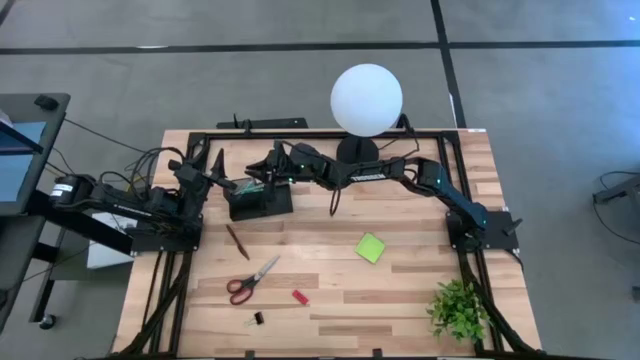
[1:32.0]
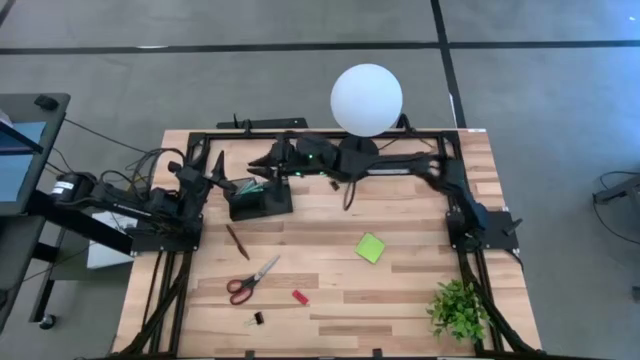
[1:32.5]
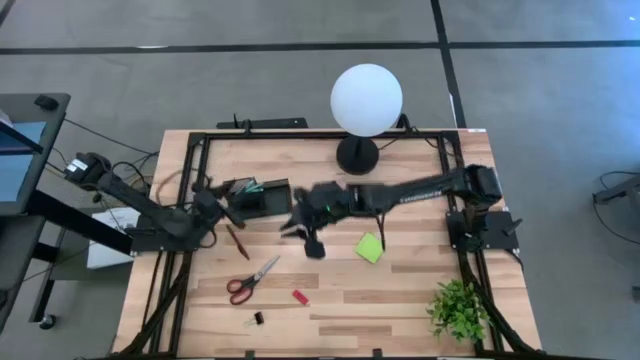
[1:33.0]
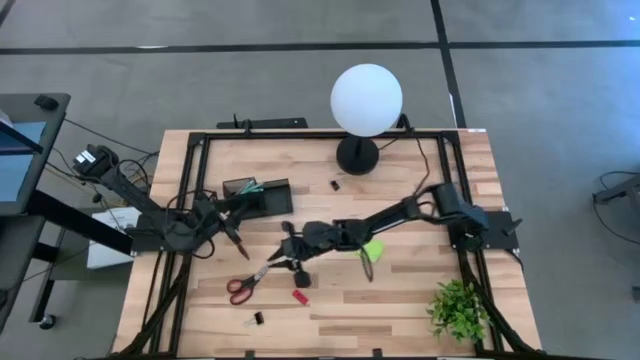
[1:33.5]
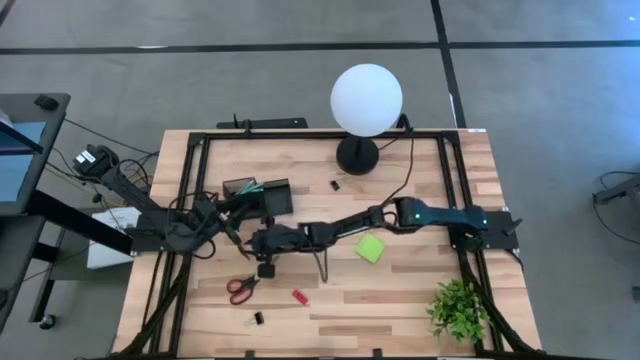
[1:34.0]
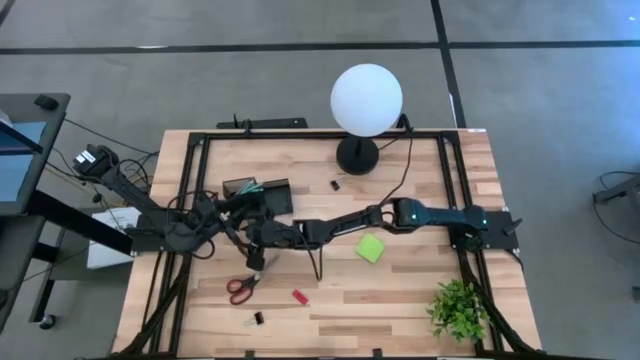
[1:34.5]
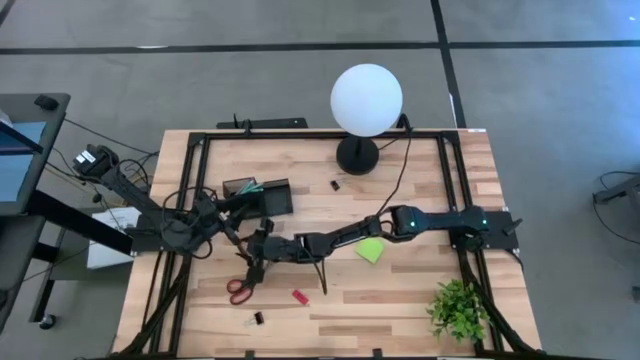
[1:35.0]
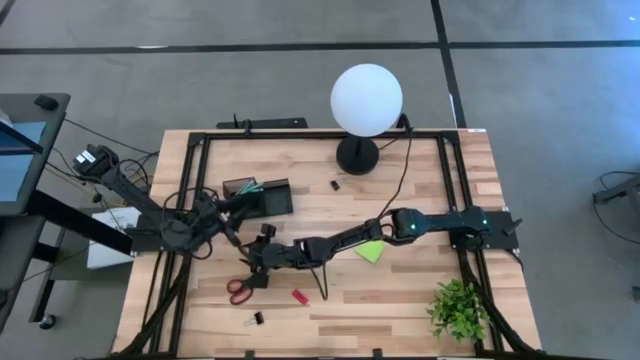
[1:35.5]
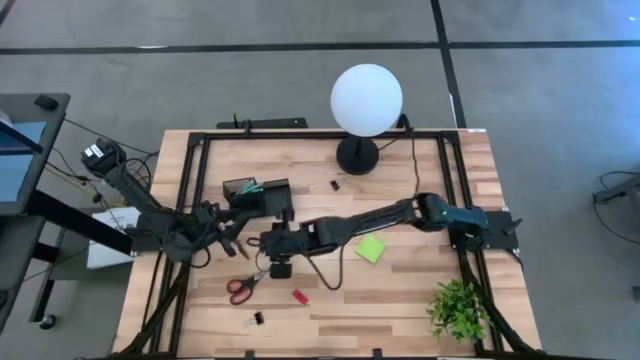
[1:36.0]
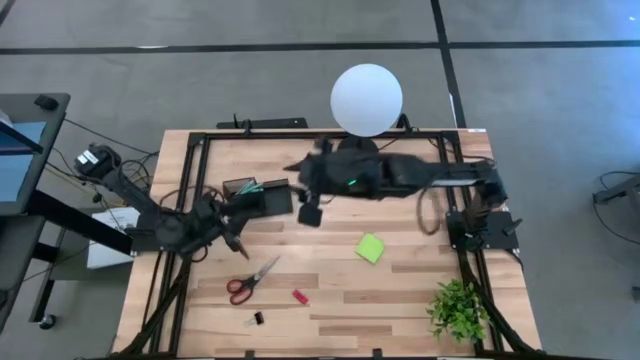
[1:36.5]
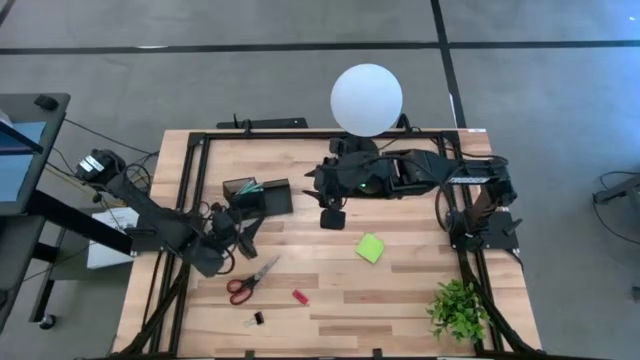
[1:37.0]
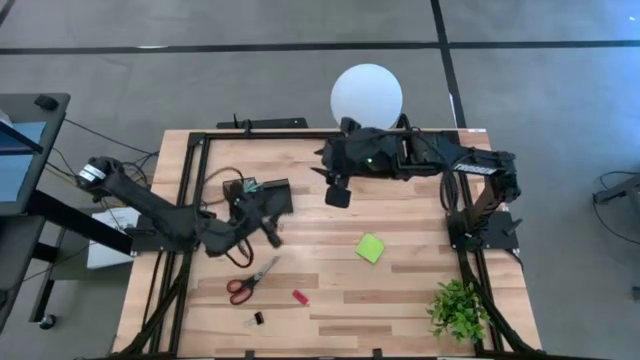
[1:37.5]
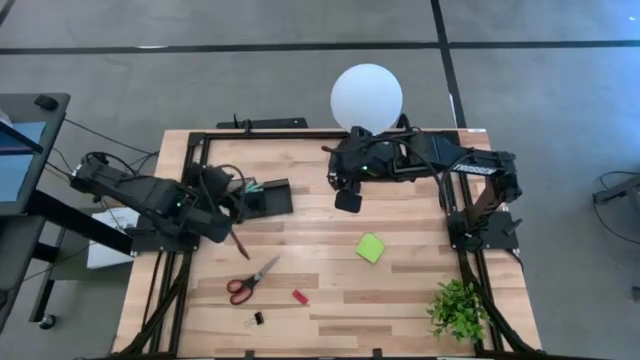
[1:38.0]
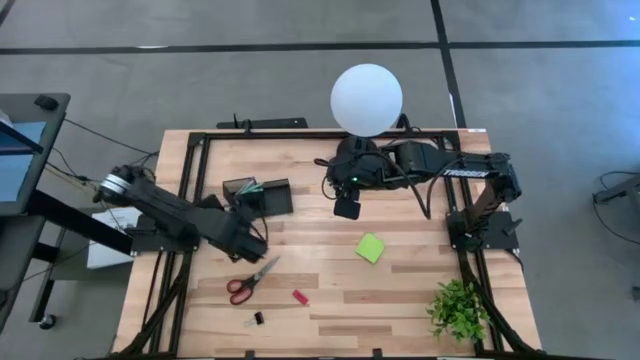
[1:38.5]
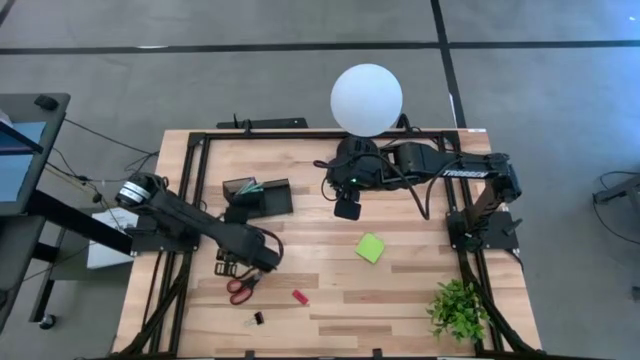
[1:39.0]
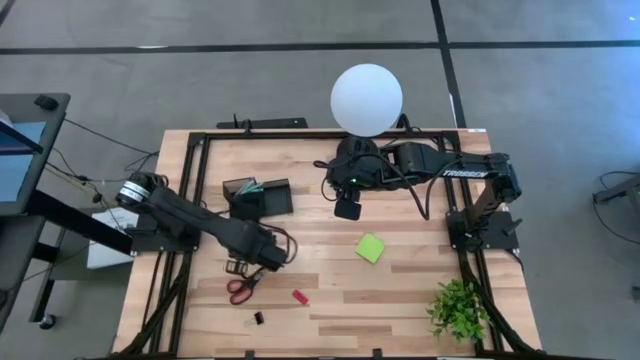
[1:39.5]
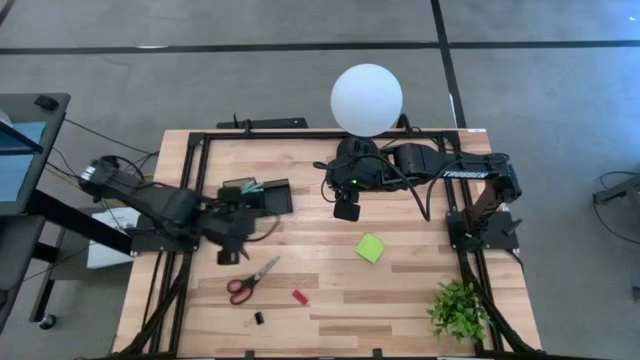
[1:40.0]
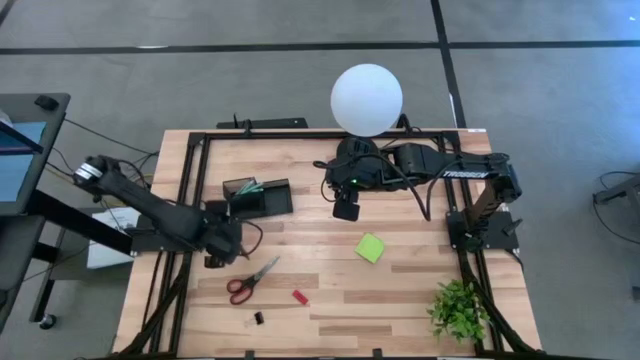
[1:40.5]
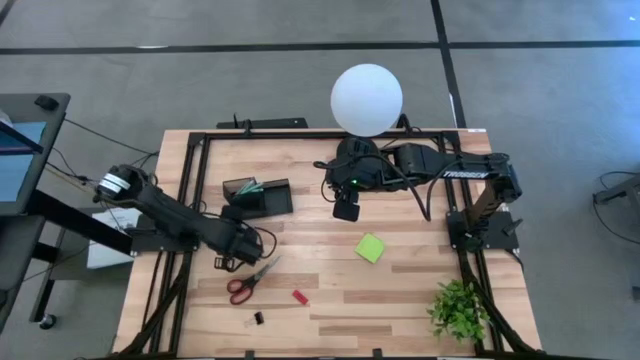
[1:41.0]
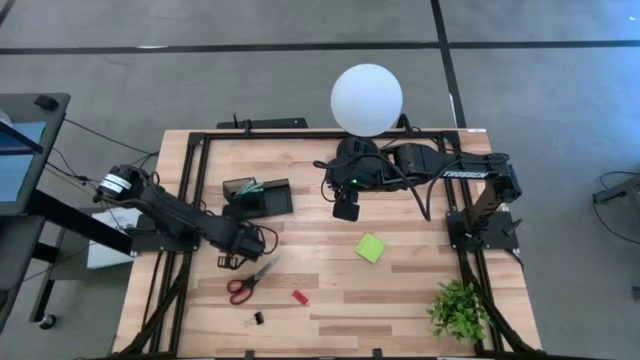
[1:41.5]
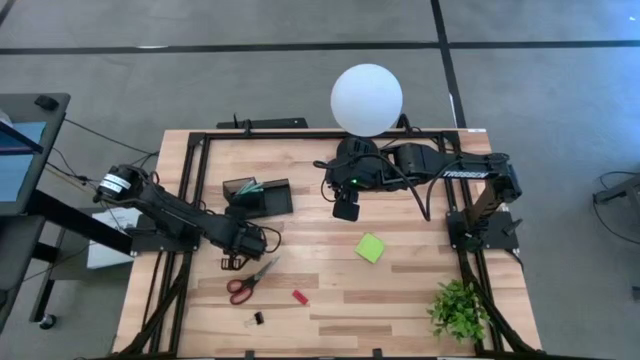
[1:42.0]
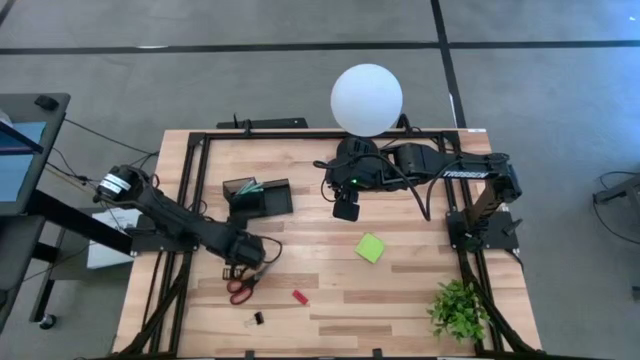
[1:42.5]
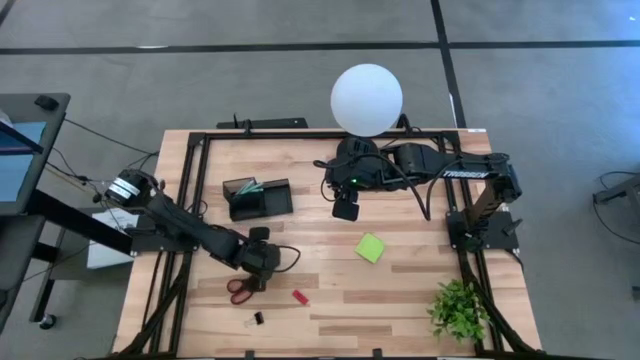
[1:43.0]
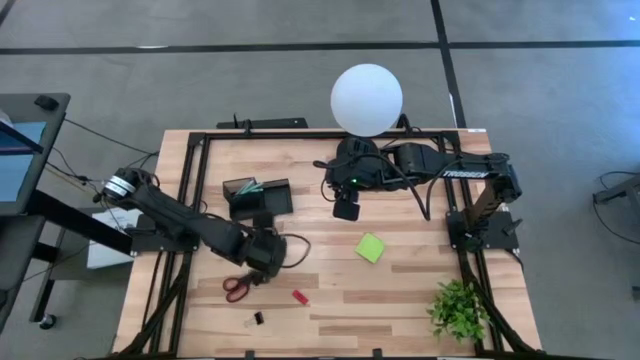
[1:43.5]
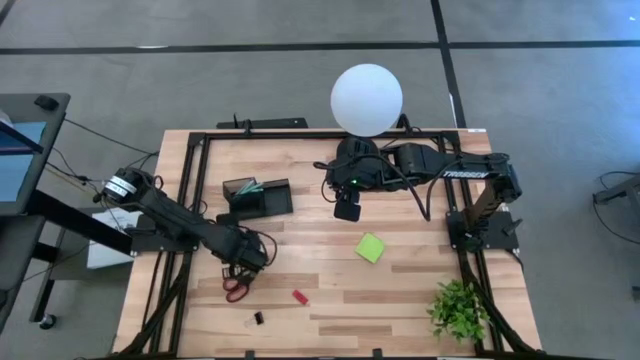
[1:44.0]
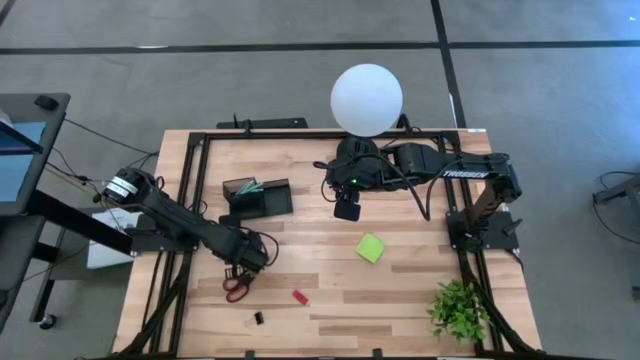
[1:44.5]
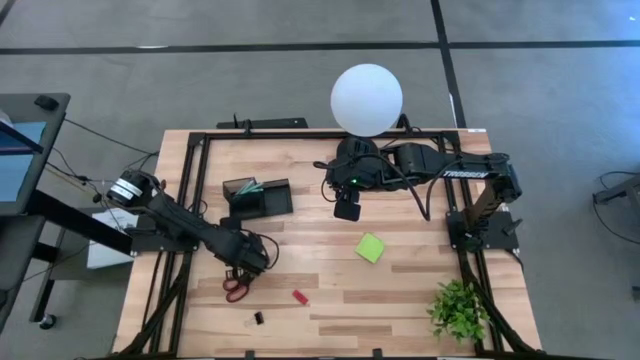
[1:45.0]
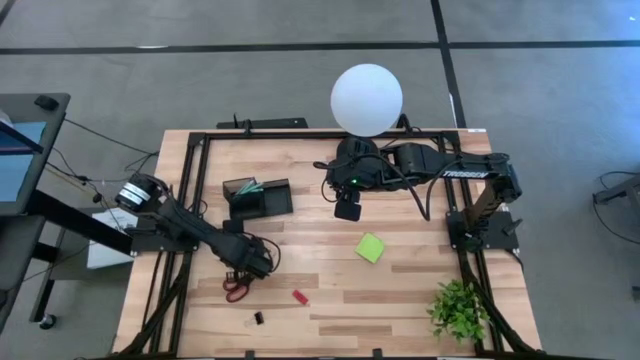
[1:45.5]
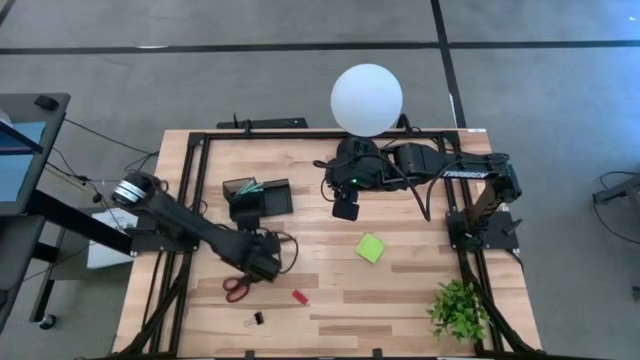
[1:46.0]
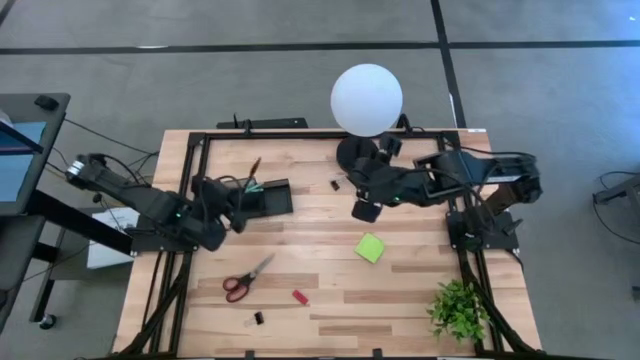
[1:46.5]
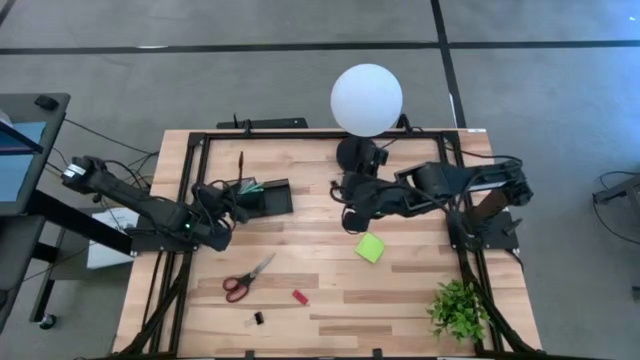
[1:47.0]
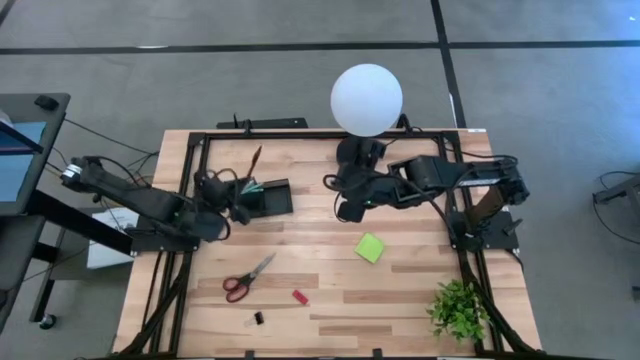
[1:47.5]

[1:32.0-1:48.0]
Task: Pick and place office supplies into organizer
Put the brown pen into the black desk organizer

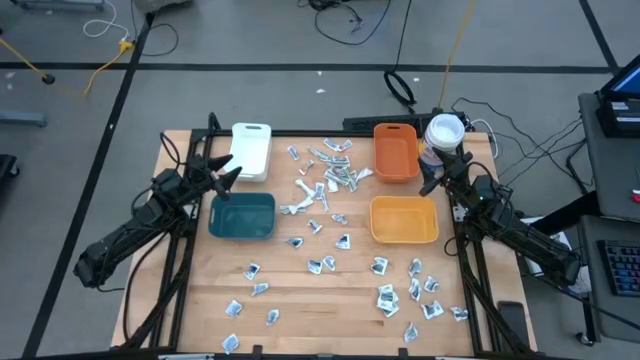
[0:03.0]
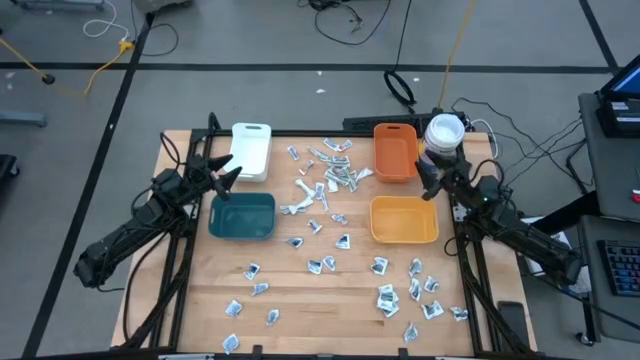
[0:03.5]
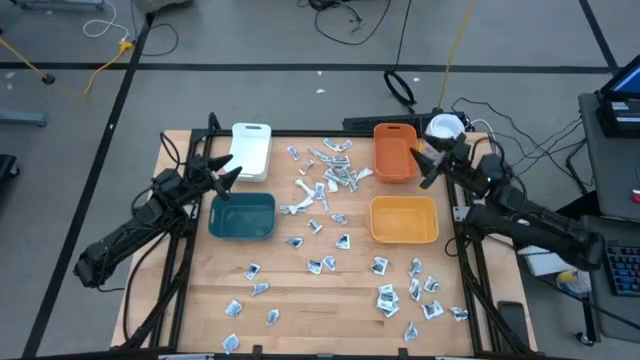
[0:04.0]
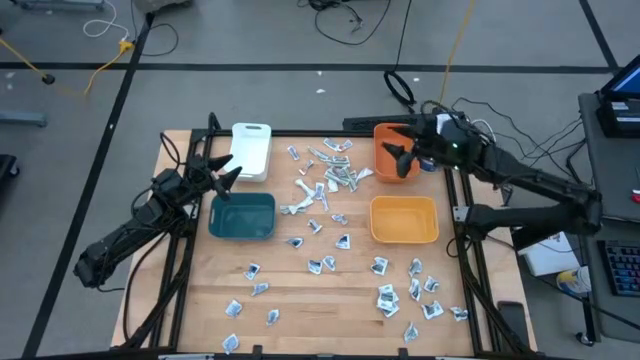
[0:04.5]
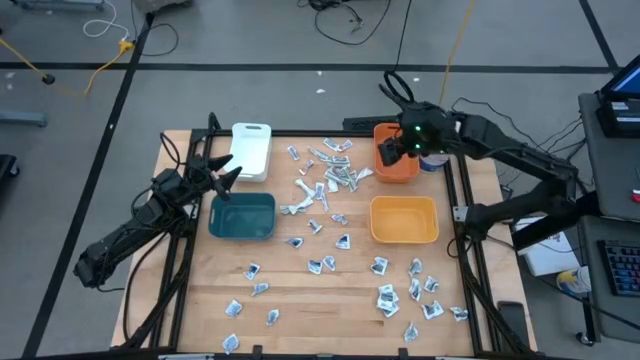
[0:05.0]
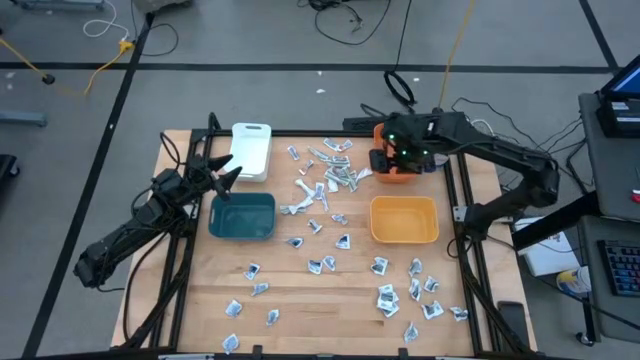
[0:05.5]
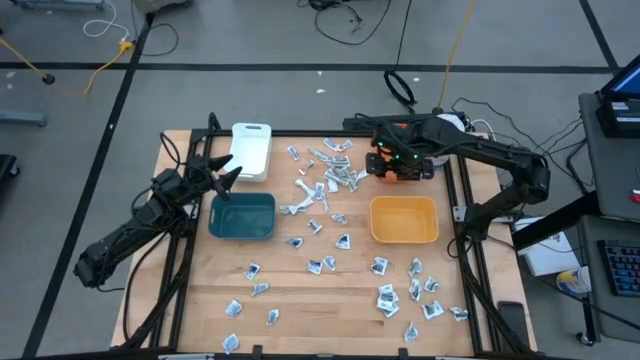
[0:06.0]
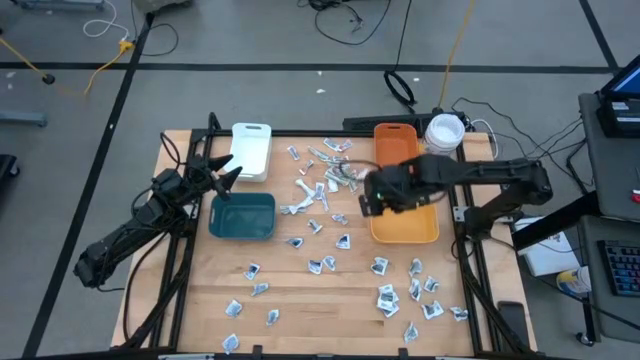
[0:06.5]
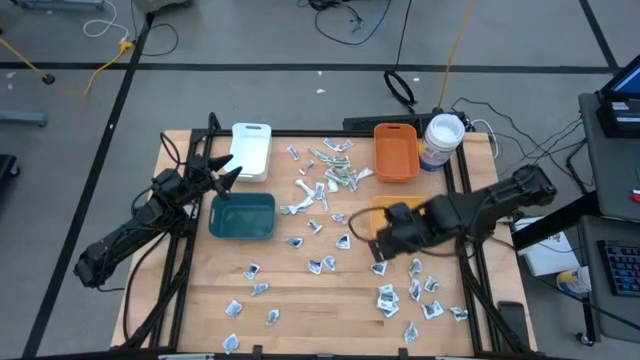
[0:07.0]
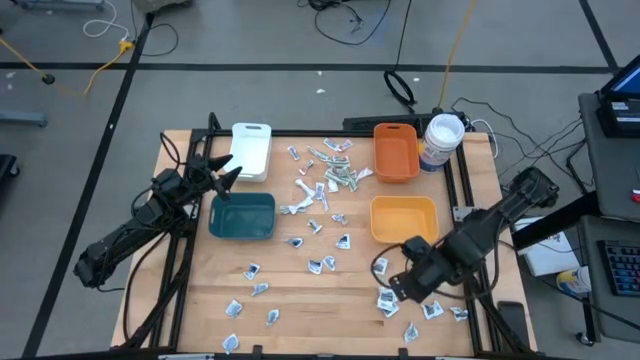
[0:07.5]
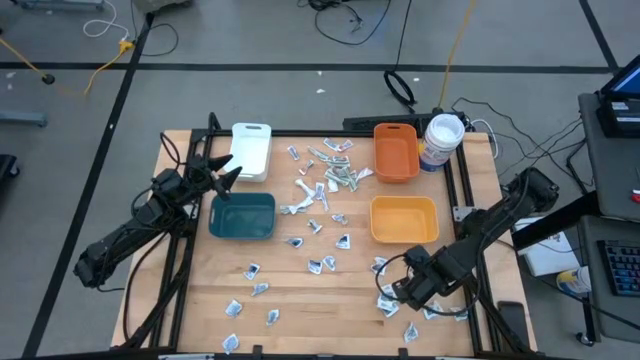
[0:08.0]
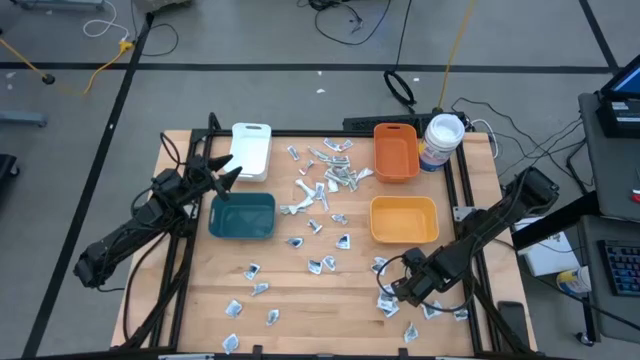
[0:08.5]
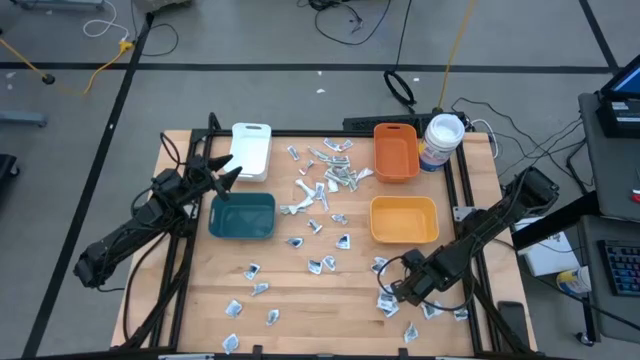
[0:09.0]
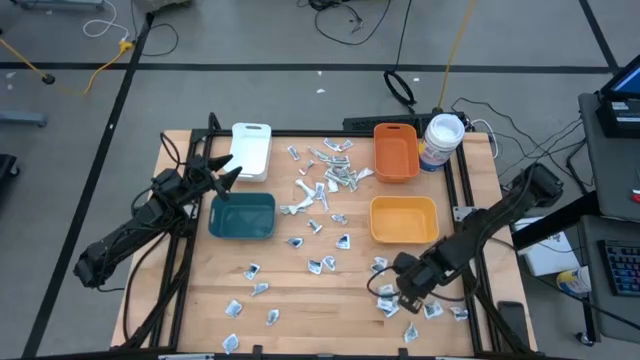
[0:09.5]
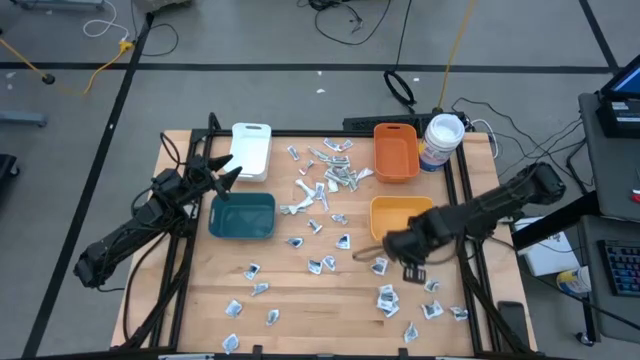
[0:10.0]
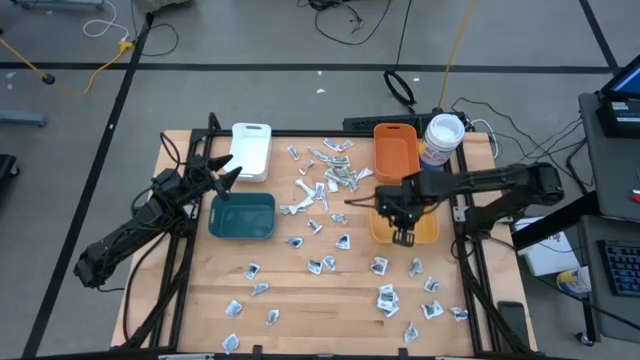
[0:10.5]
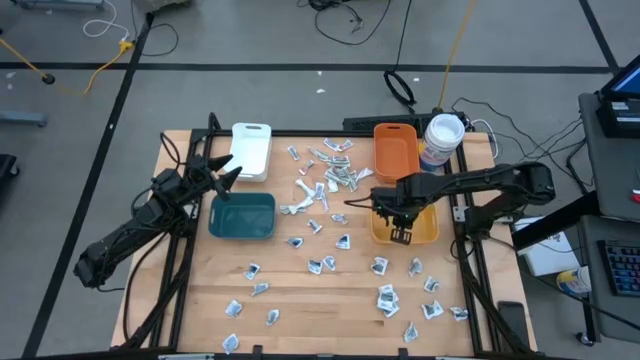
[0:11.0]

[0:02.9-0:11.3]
Task: Pick & Place First Aid Supplies
Put the antiseptic towelette into the yellow bin
